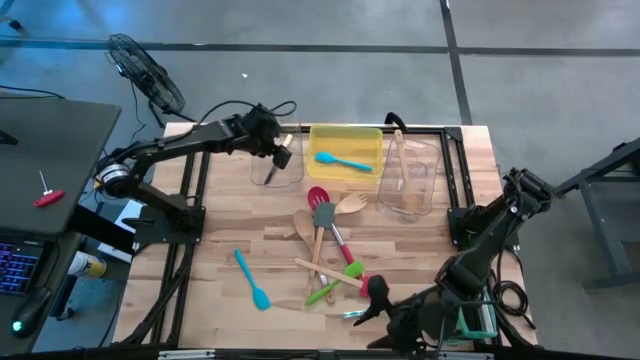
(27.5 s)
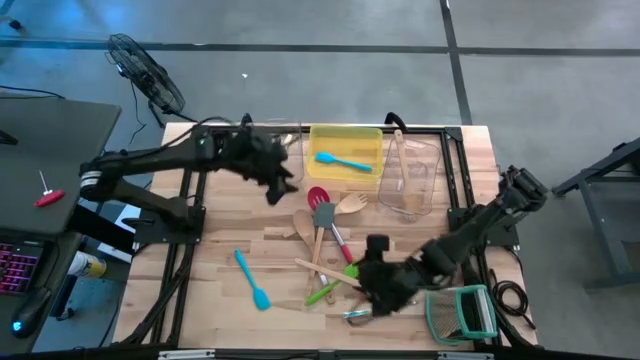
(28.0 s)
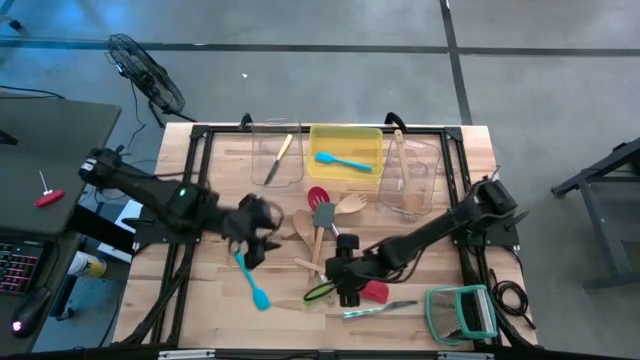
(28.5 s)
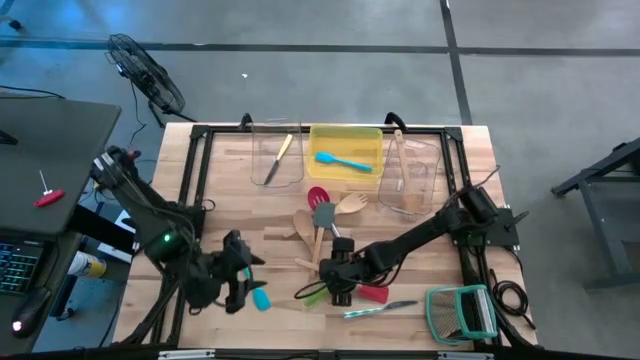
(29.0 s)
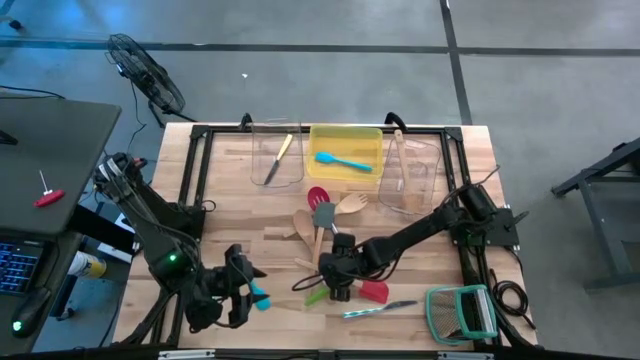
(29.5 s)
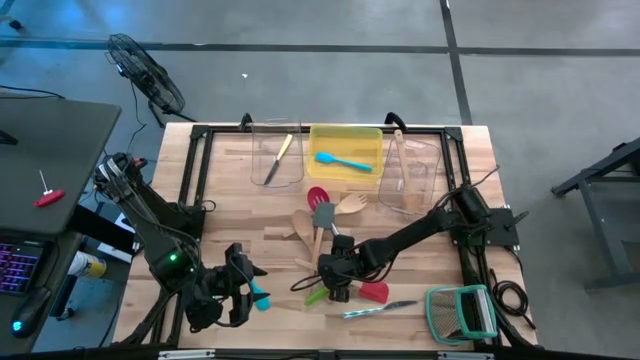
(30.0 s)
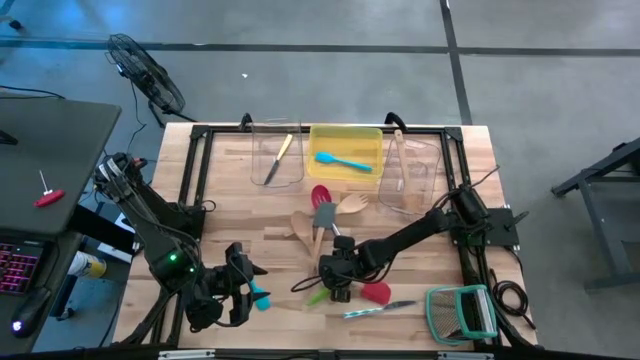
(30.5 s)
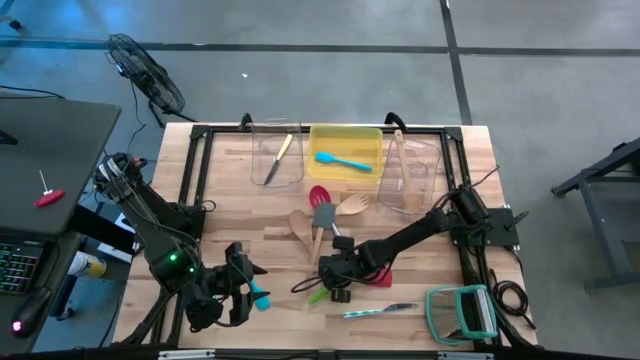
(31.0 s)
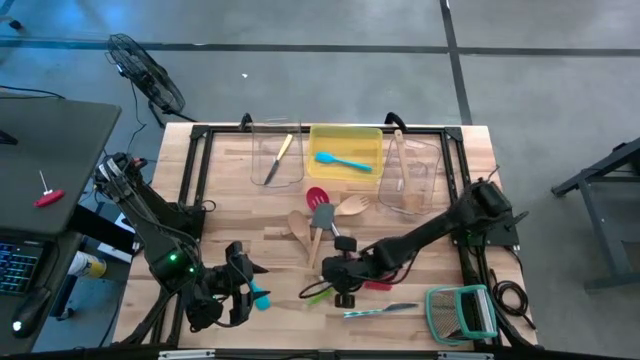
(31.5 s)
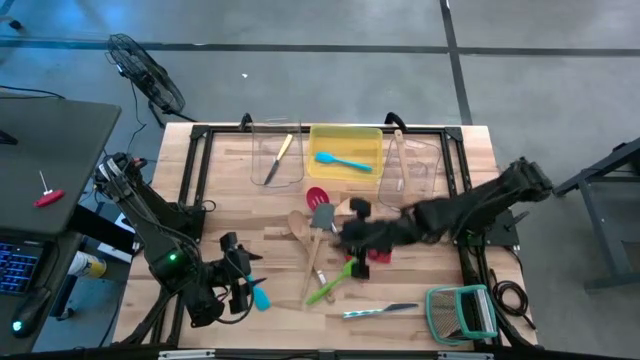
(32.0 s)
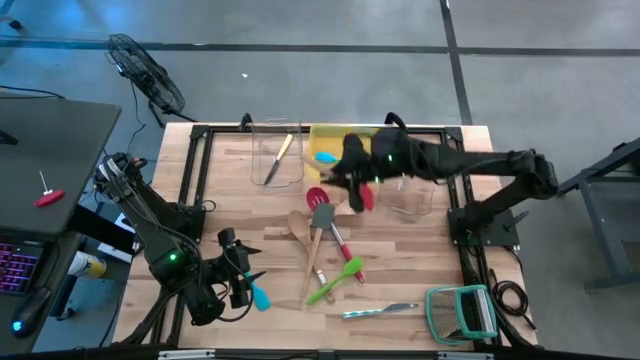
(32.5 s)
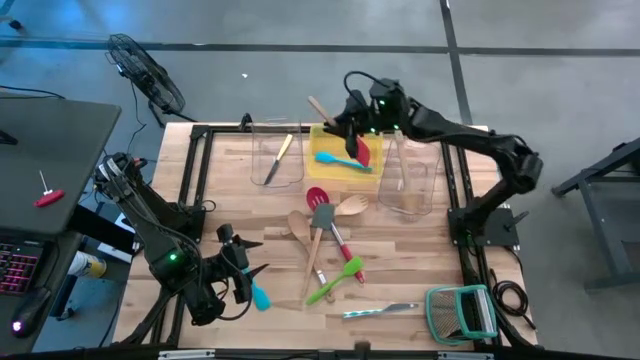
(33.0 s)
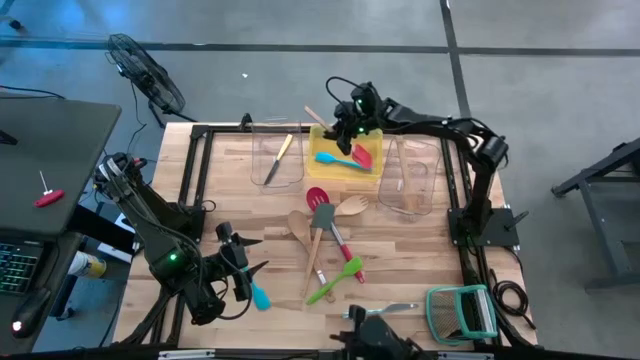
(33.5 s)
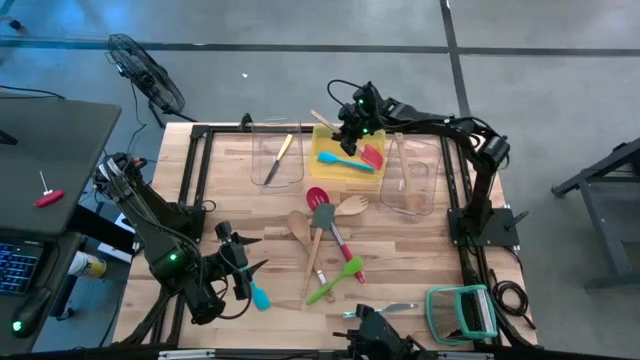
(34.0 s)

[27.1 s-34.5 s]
Task: Pick & Place Kitchen Items
Put the red spatula into the yellow bin

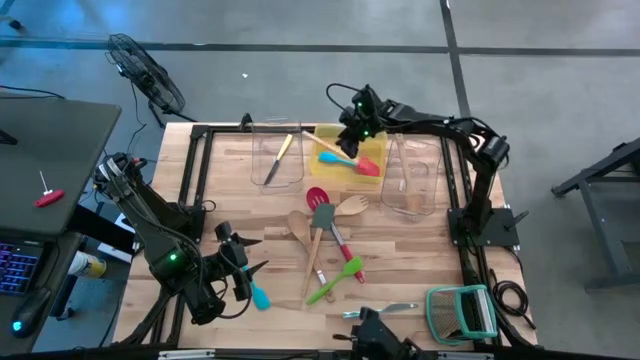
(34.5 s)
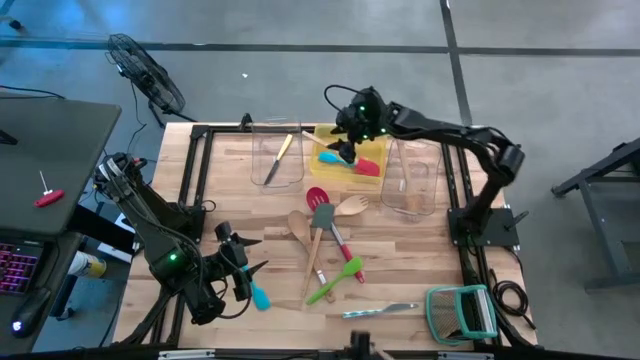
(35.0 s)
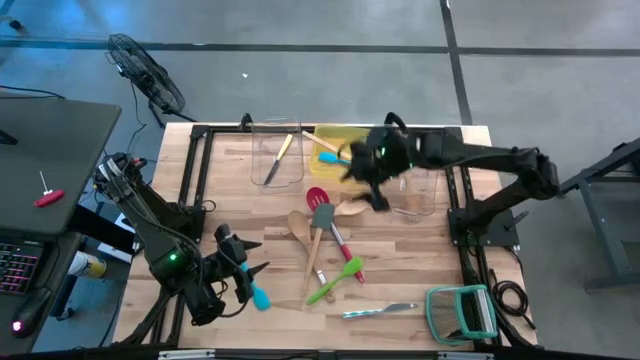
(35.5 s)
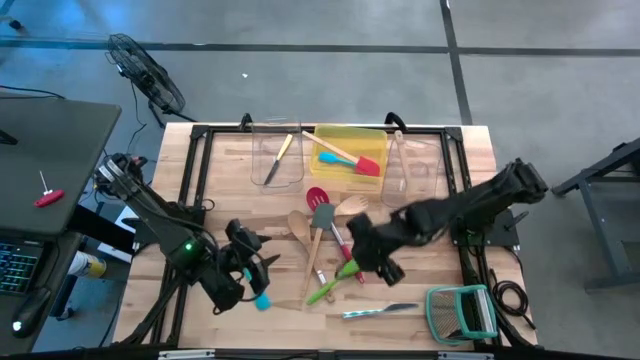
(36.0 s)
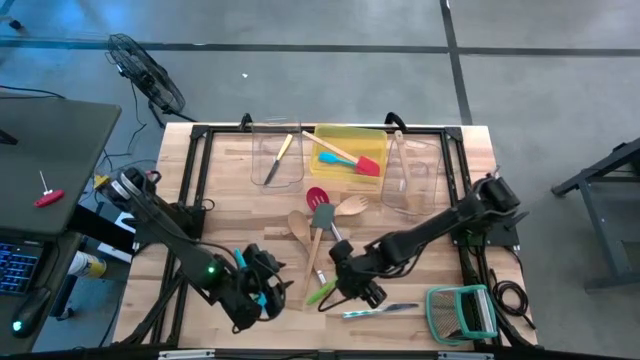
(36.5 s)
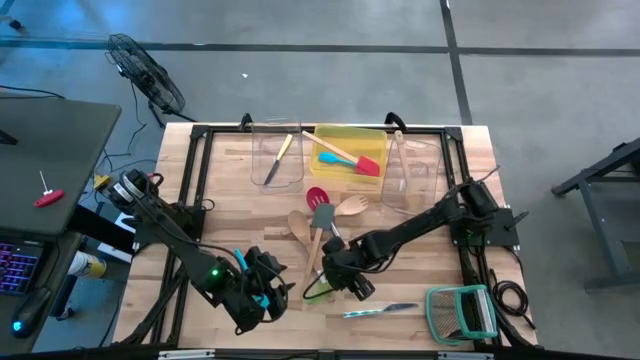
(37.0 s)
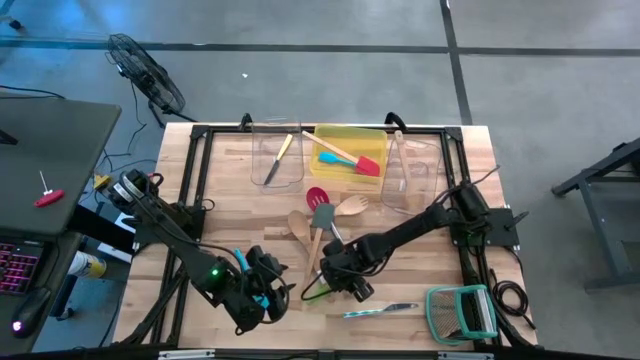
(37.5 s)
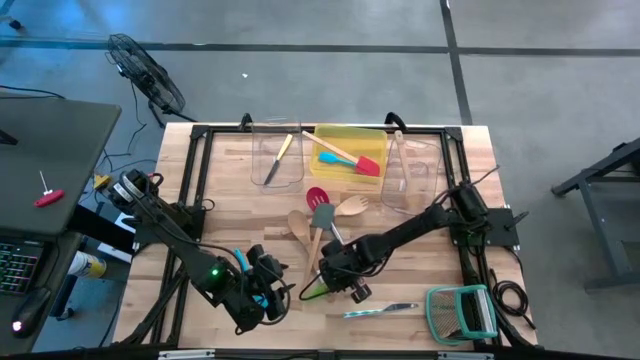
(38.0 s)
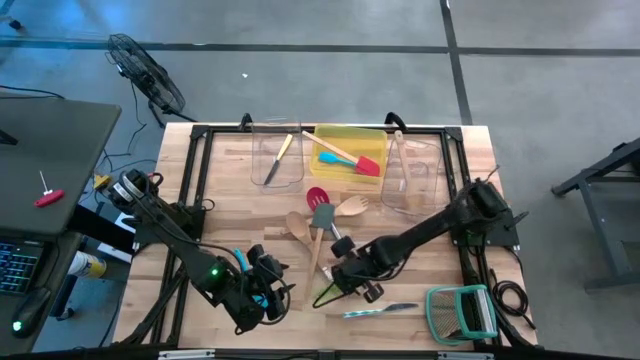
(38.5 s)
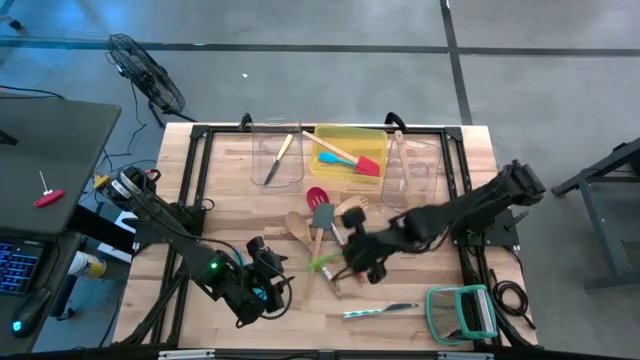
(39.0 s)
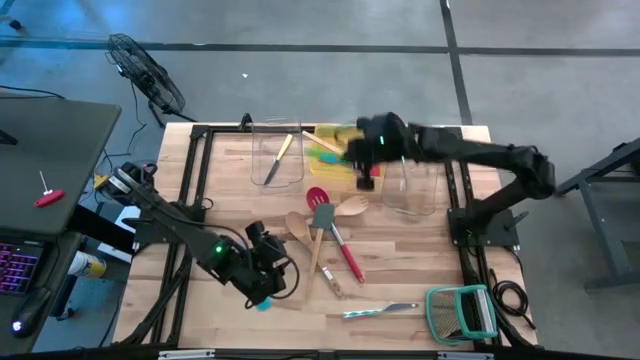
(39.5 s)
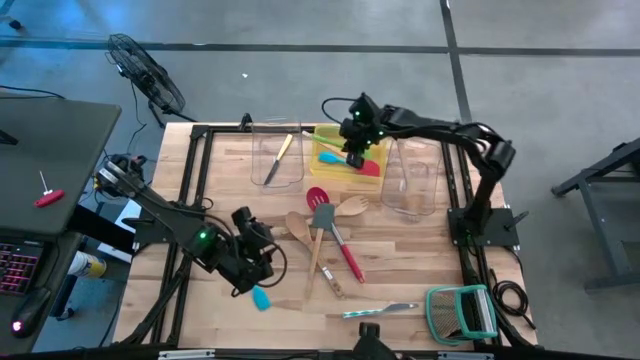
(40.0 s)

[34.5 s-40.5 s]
Put the green spatula into the yellow bin

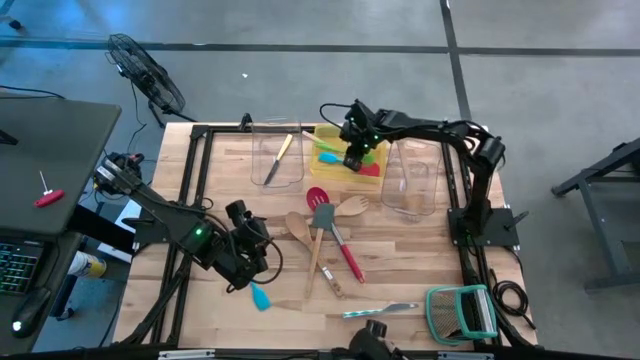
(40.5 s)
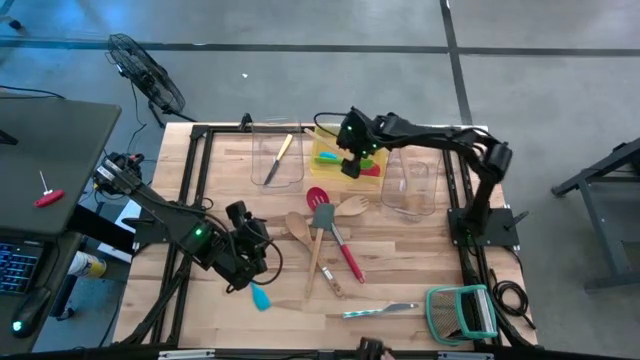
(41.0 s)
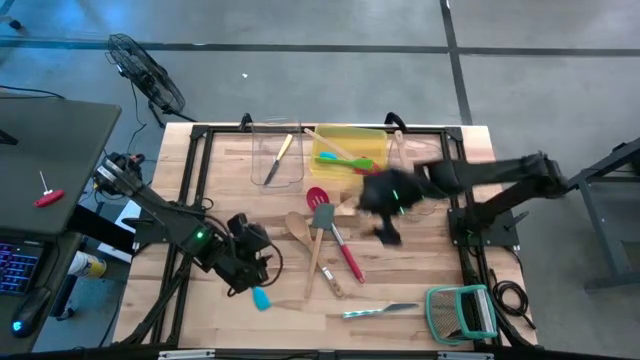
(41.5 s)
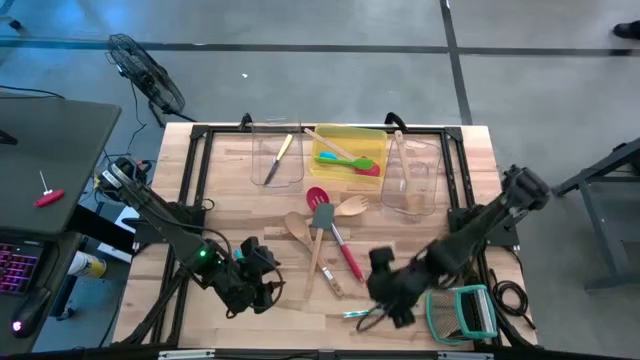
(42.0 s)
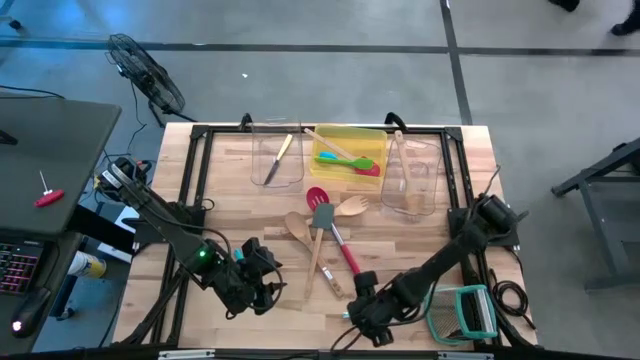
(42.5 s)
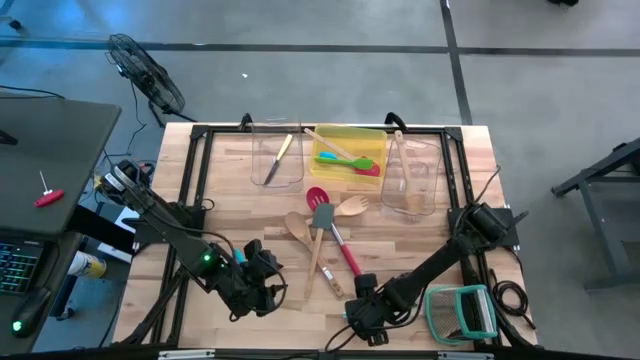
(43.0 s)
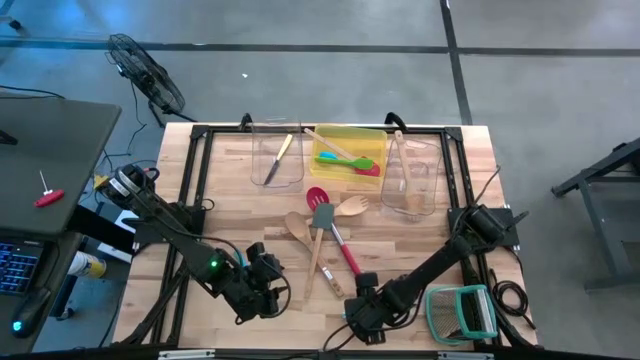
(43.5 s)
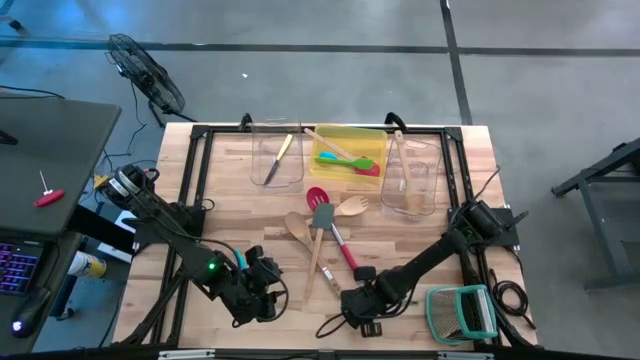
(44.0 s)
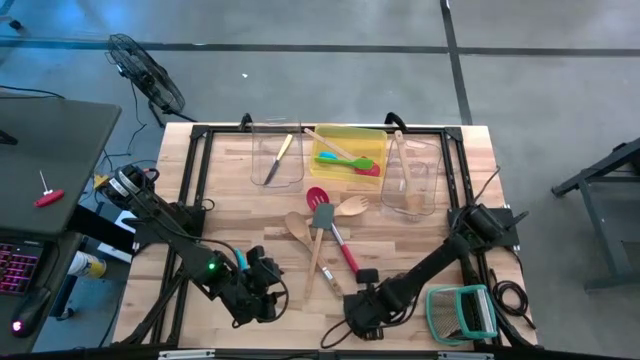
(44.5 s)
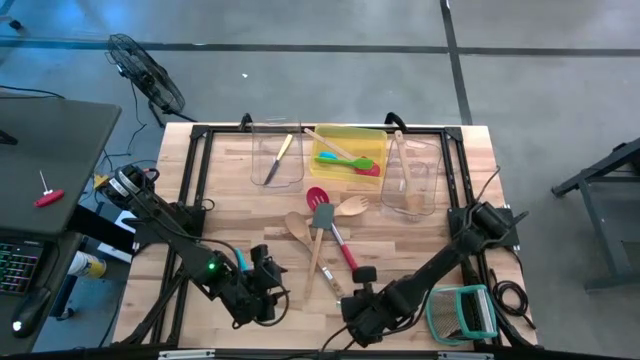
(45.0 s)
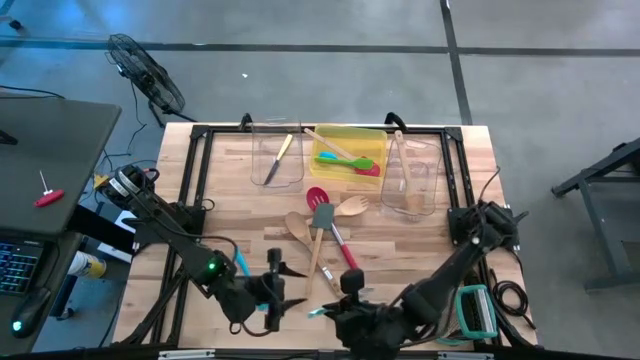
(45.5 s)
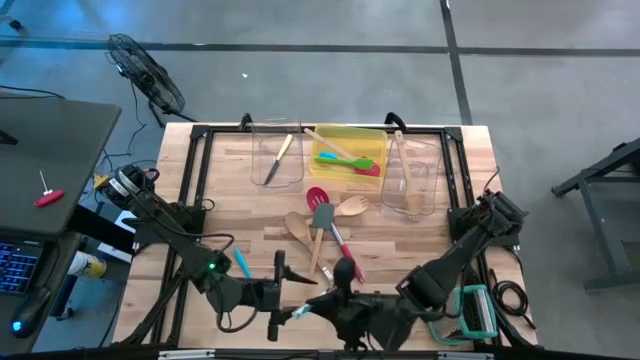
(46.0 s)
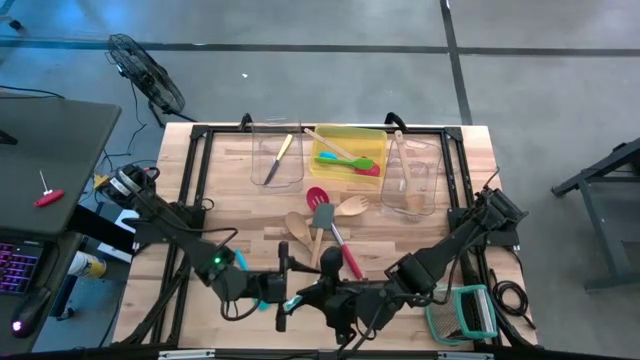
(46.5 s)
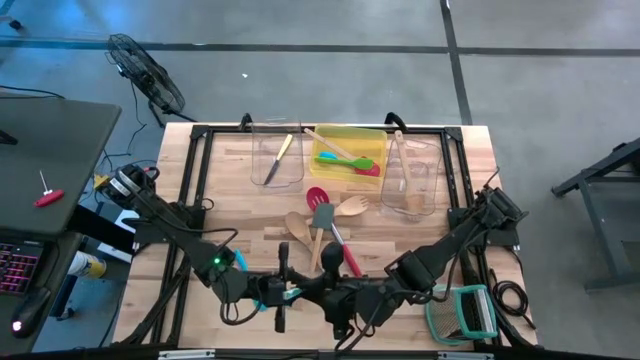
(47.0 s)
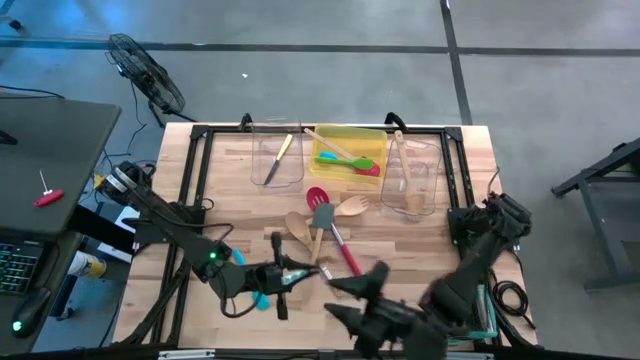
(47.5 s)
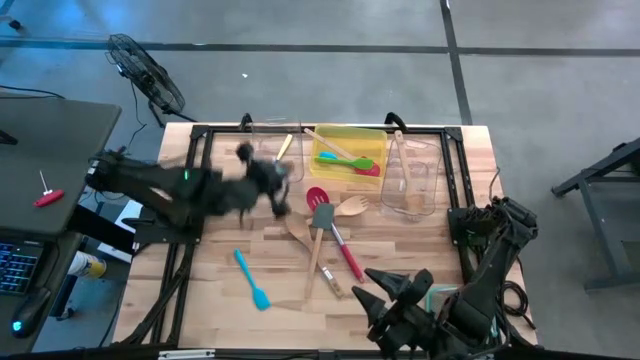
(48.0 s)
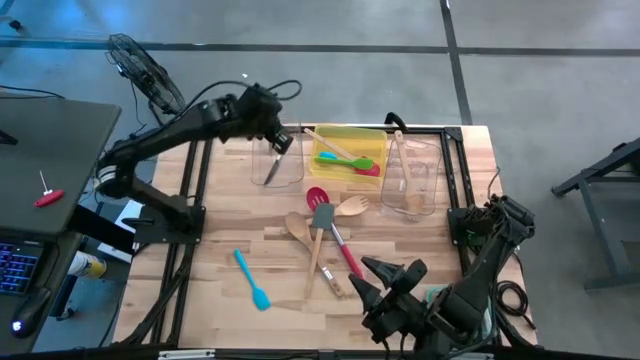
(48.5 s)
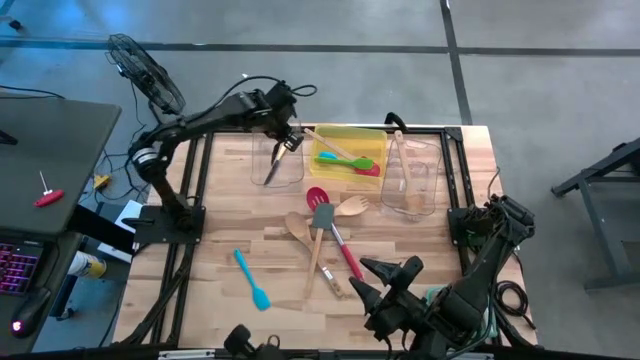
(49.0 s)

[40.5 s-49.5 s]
Put the white table knife into the left transparent bin
